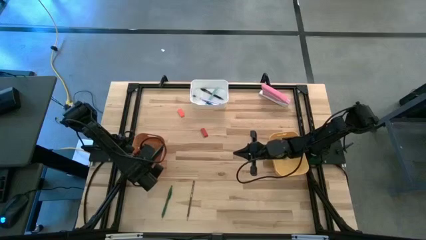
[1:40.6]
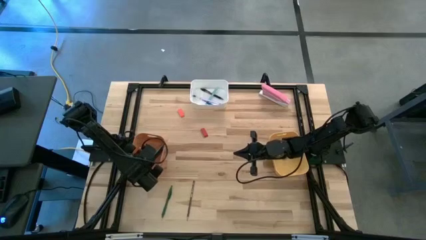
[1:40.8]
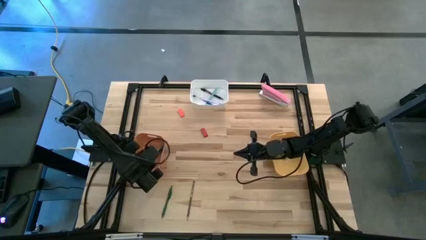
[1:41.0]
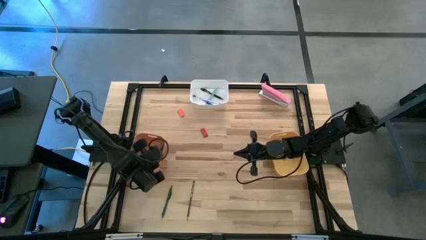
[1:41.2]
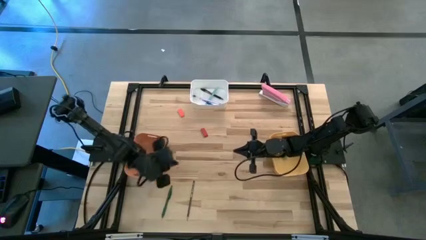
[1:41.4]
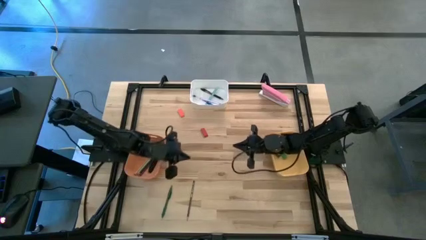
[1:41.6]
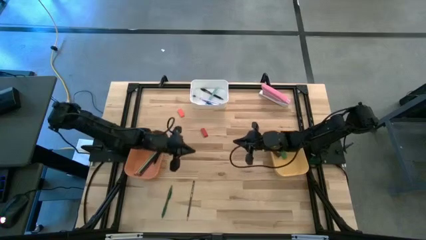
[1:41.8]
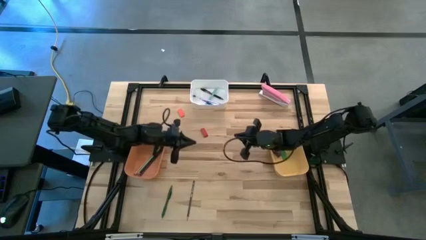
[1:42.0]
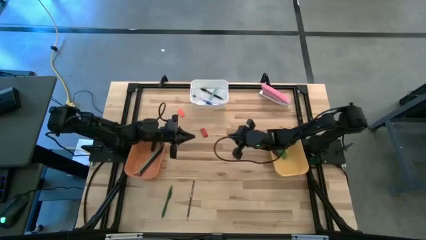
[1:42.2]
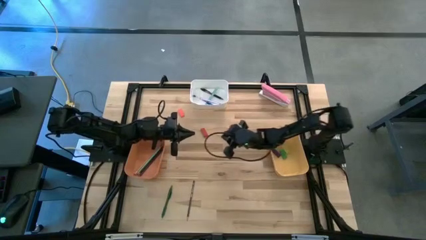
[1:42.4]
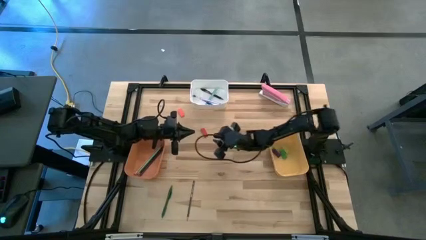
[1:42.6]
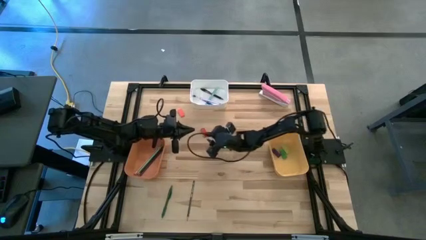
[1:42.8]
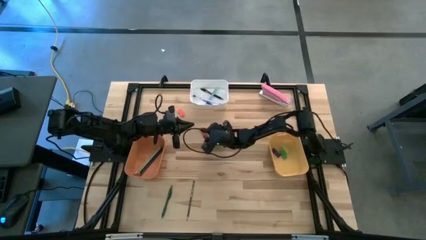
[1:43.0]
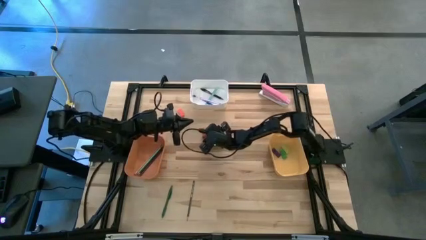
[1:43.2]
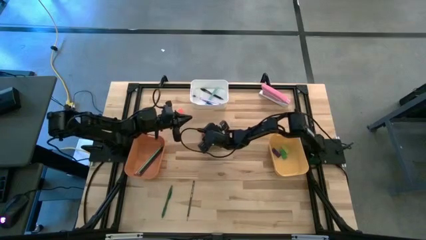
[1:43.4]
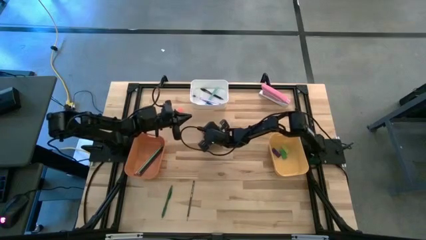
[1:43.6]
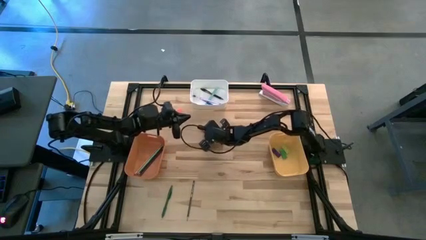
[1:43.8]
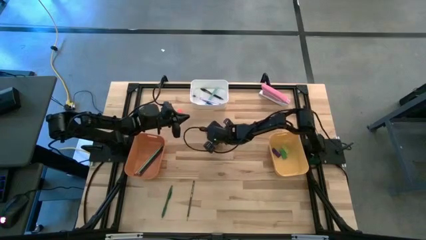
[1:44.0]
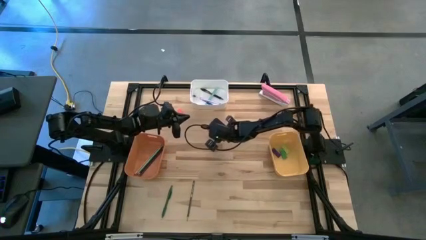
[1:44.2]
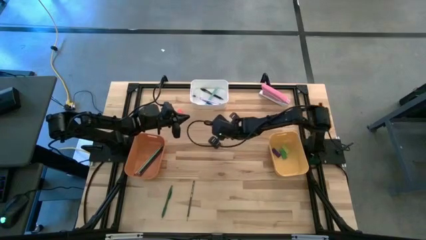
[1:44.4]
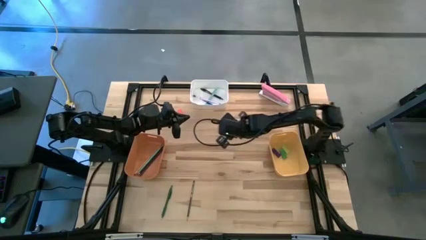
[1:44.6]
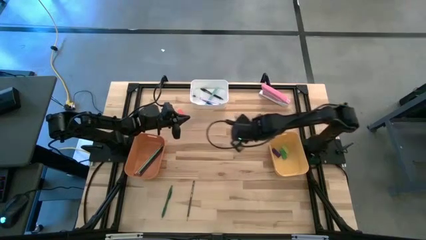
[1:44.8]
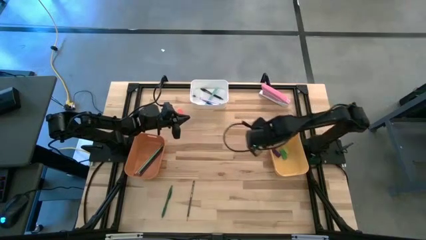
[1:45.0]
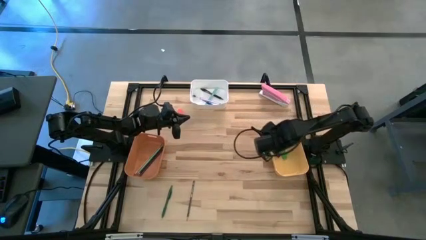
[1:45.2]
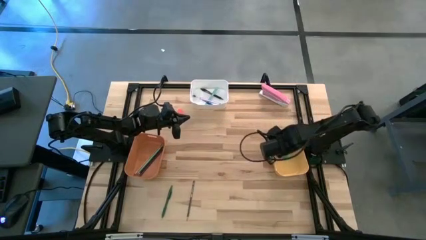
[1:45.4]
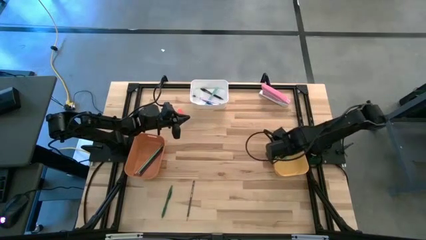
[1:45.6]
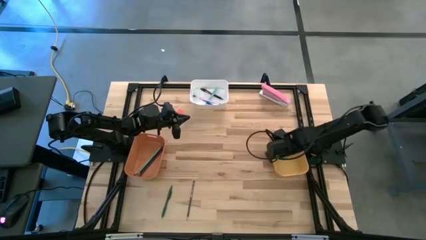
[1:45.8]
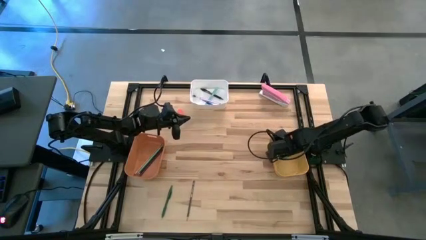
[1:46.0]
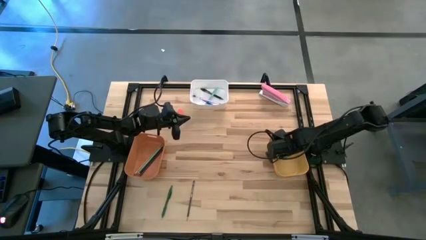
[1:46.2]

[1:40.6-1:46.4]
Task: Sort crayons/erasers/pens/pencils in bins
Put the red eraser into the yellow bin

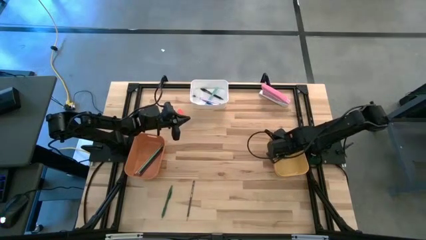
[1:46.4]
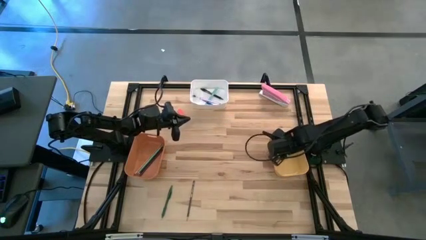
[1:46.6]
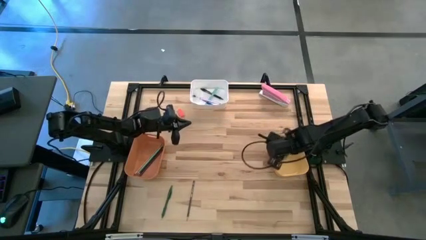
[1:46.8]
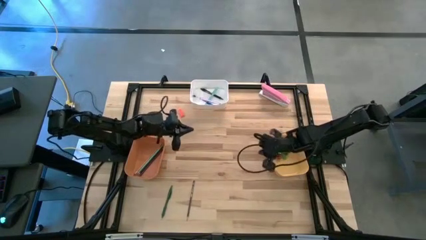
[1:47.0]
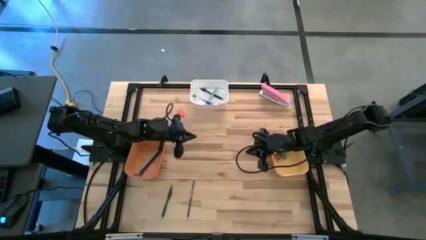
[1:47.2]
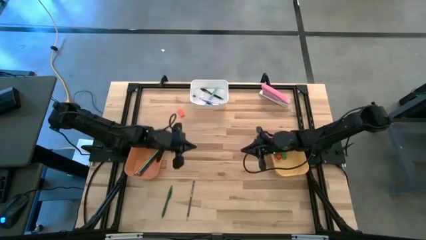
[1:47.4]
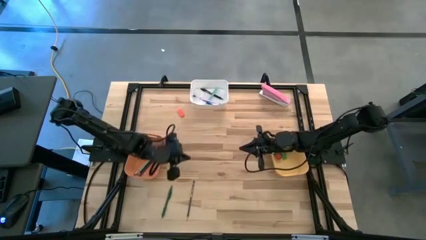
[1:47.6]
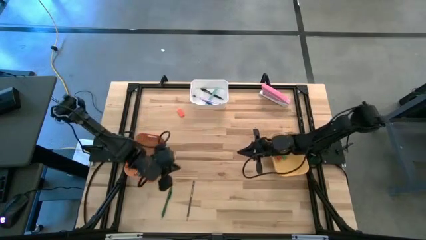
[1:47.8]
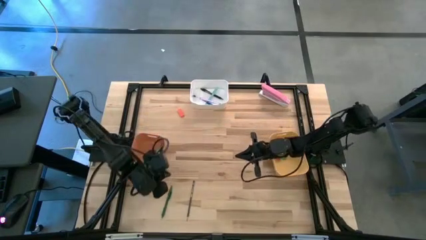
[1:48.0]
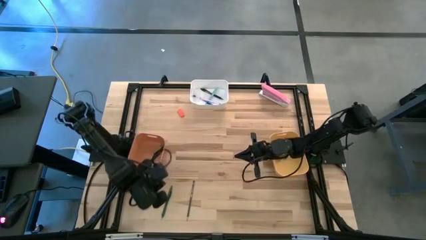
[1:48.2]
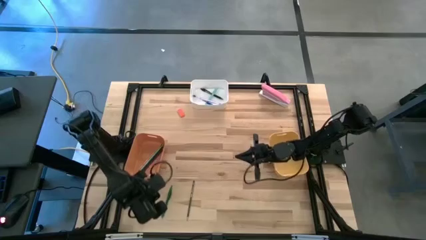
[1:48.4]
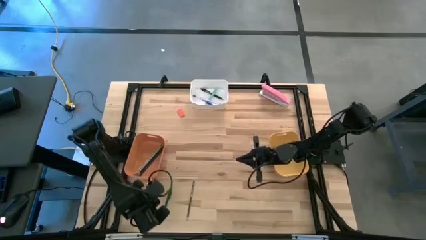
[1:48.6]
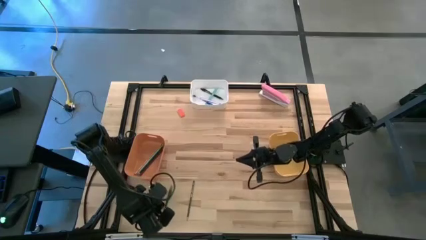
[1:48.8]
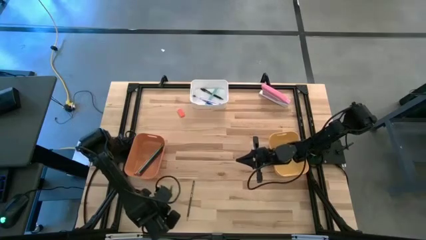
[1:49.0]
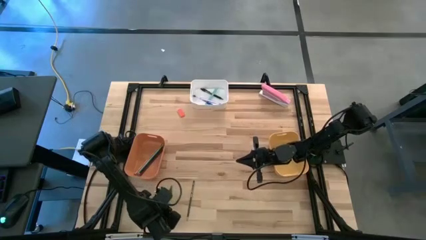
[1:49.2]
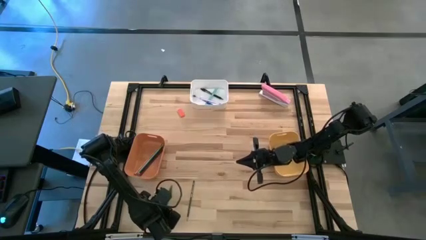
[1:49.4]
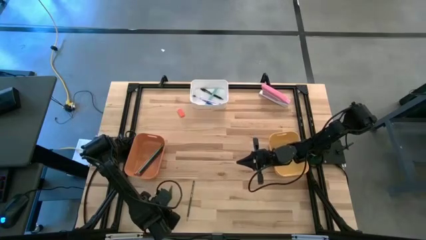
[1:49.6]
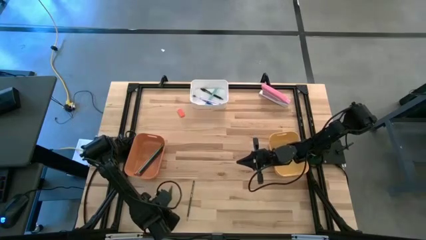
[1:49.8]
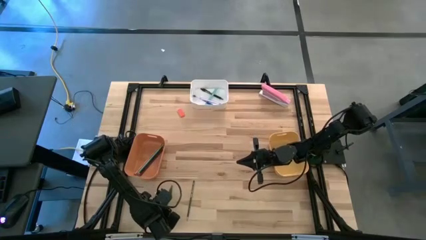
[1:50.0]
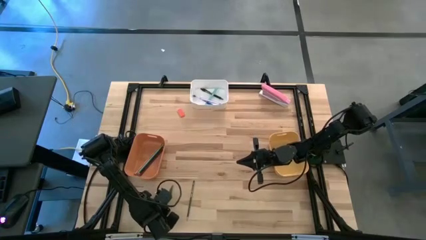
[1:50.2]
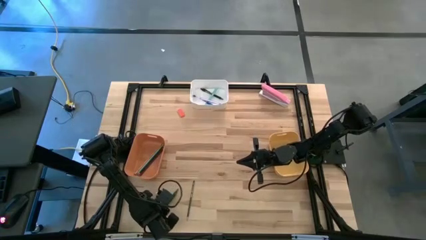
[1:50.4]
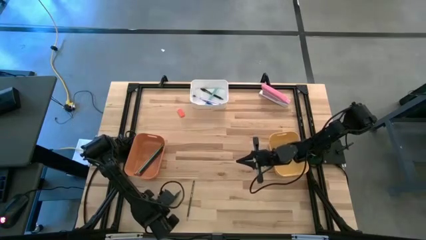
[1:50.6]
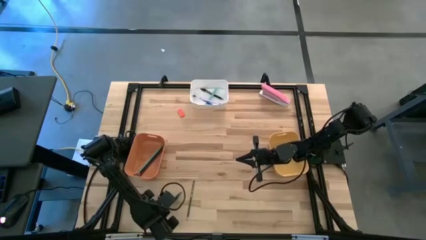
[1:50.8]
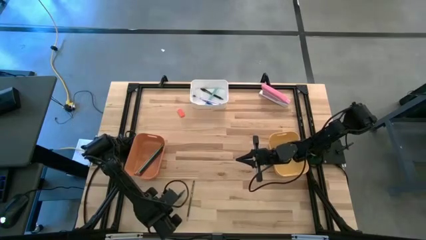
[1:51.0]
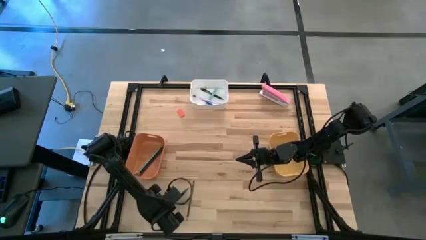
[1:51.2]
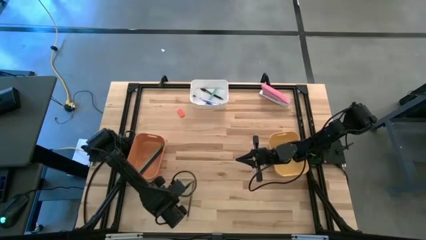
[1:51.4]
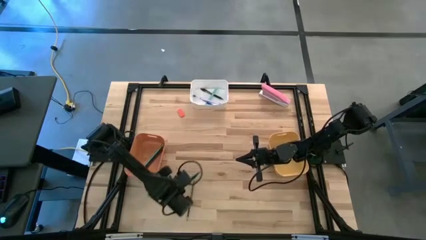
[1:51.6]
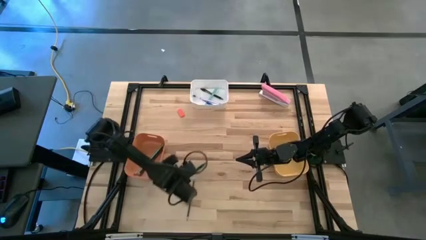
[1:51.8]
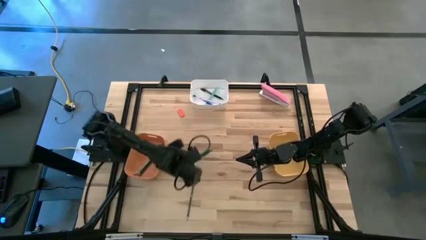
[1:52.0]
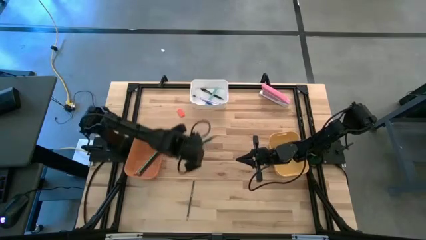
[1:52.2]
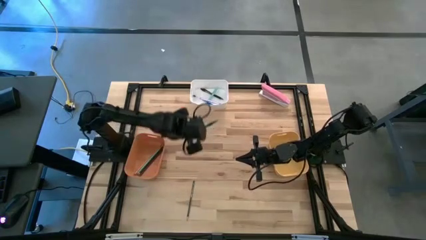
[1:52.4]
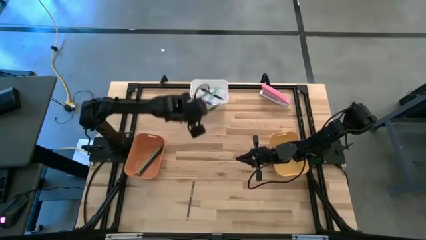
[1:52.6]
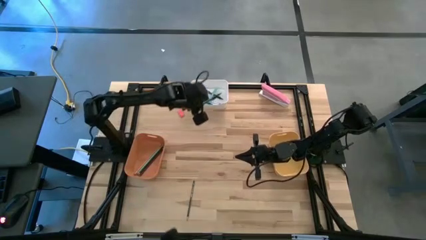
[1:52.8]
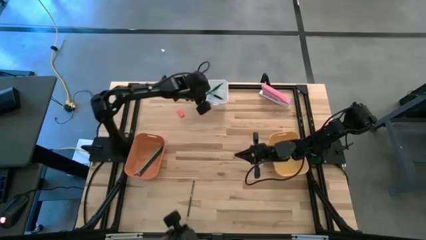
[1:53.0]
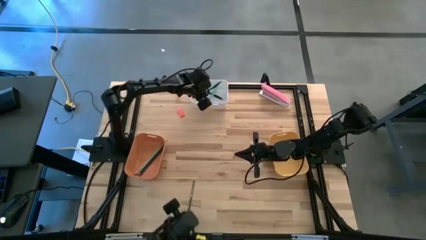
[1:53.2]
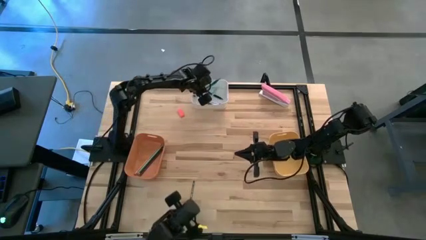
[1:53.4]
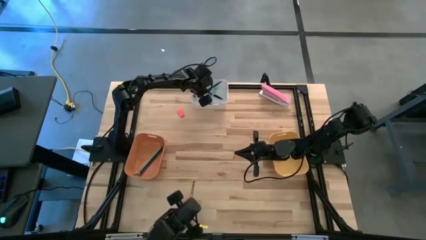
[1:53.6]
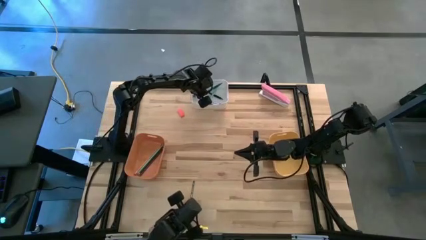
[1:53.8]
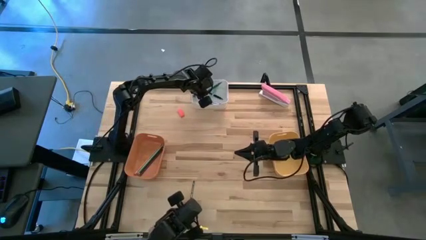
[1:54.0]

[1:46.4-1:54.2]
Put the green pen into the white bin

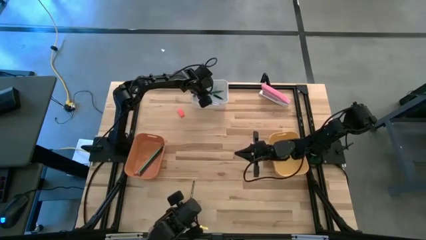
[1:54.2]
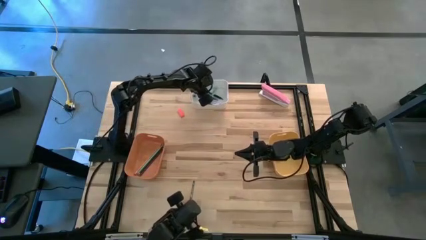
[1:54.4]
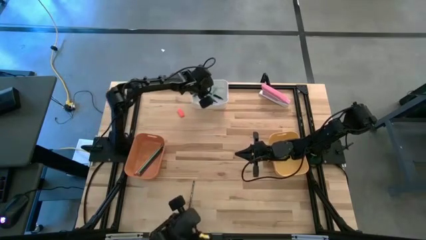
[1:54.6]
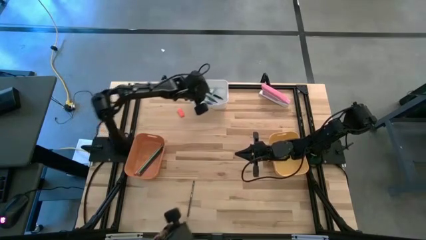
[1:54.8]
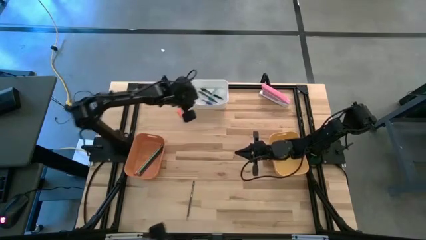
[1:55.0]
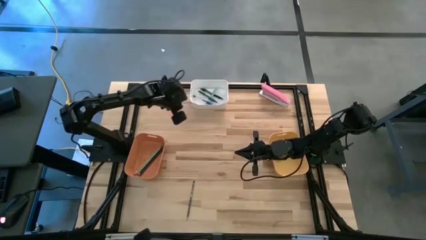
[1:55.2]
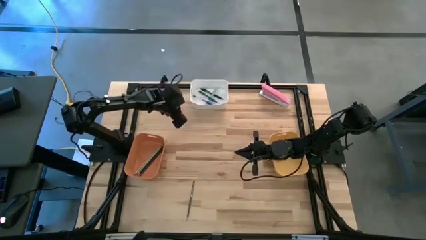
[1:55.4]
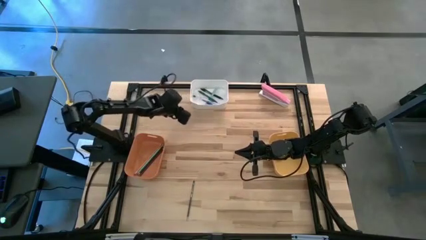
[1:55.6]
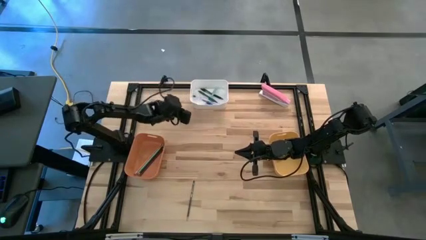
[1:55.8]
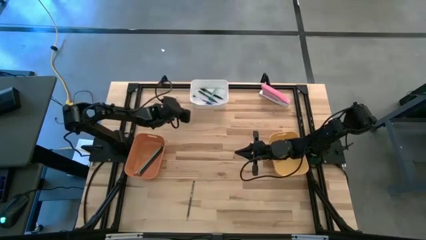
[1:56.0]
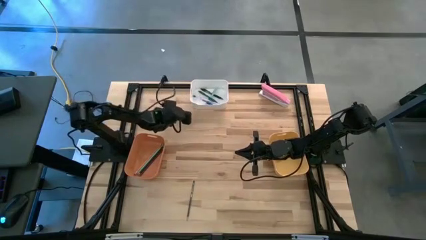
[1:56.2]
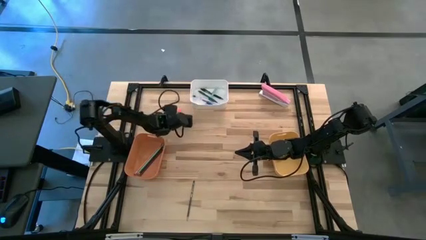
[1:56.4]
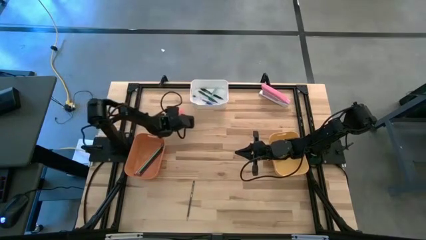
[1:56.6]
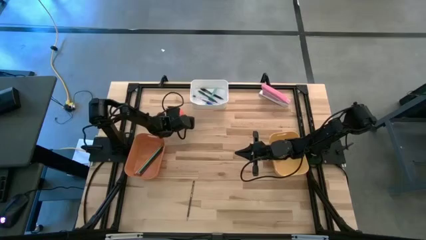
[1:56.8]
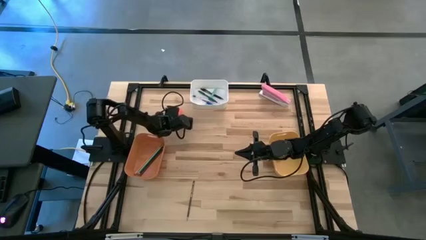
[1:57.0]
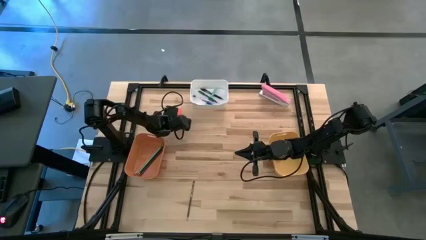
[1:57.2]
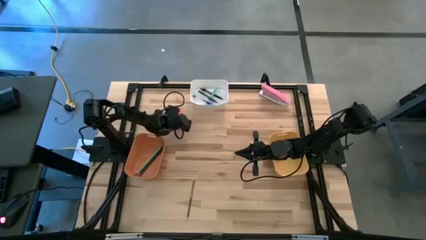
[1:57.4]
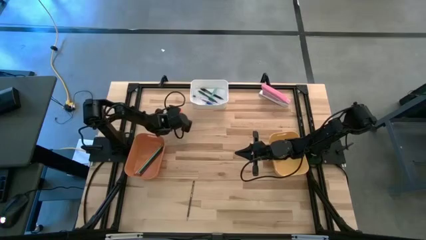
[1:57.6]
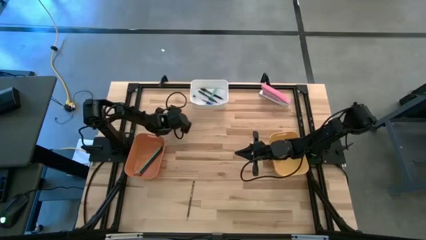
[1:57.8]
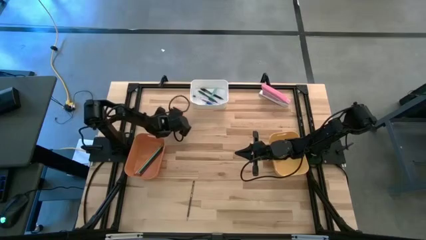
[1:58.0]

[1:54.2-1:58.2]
Put the orange eraser into the yellow bin
